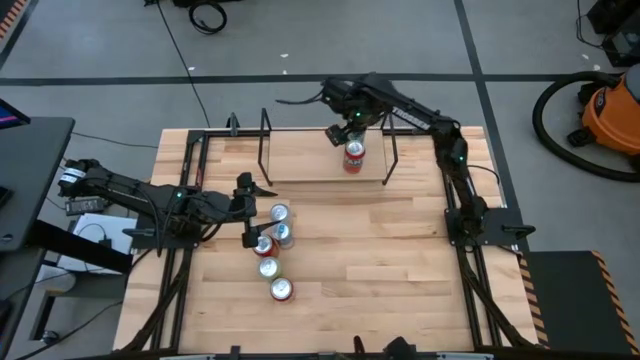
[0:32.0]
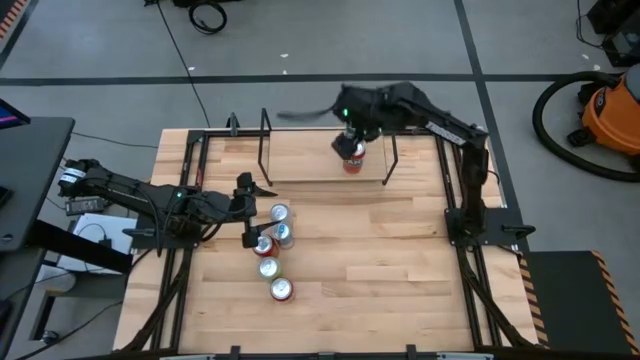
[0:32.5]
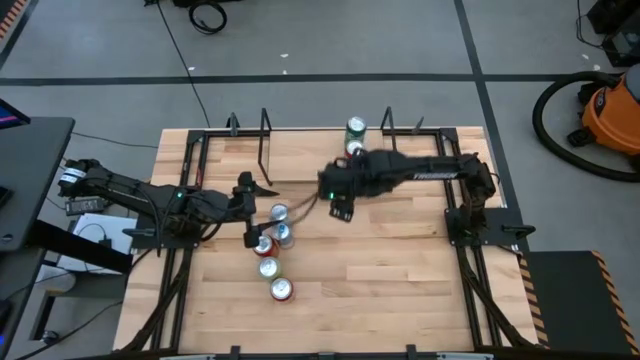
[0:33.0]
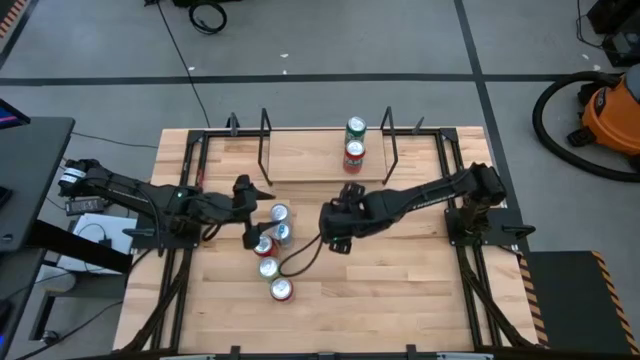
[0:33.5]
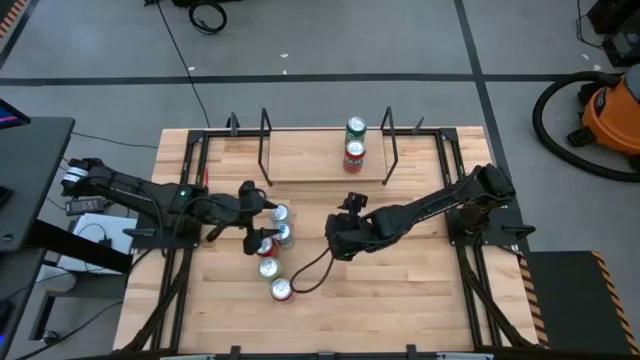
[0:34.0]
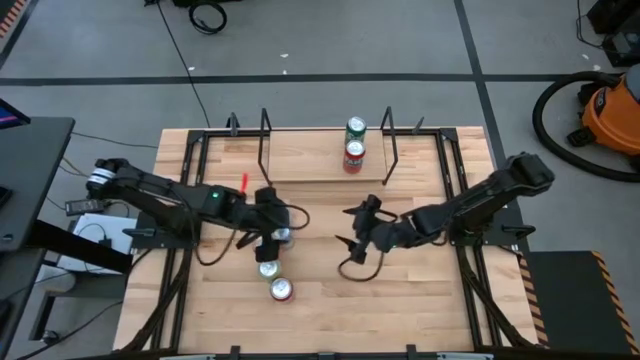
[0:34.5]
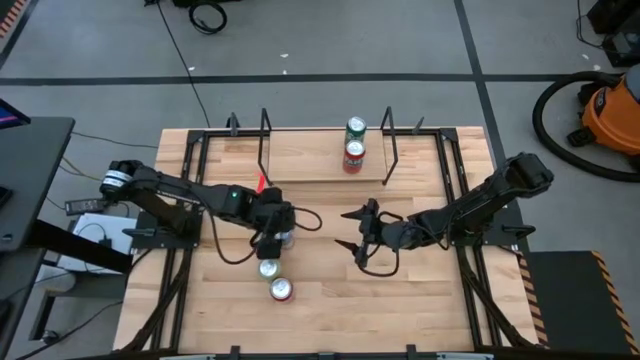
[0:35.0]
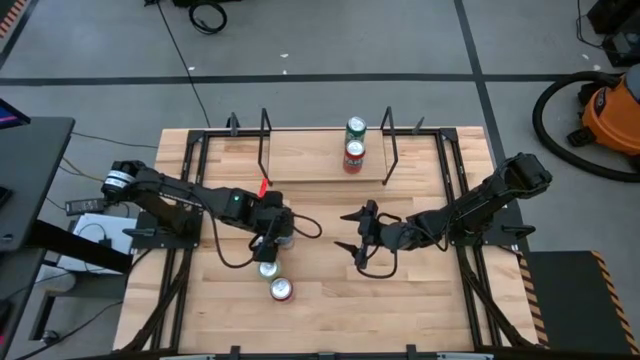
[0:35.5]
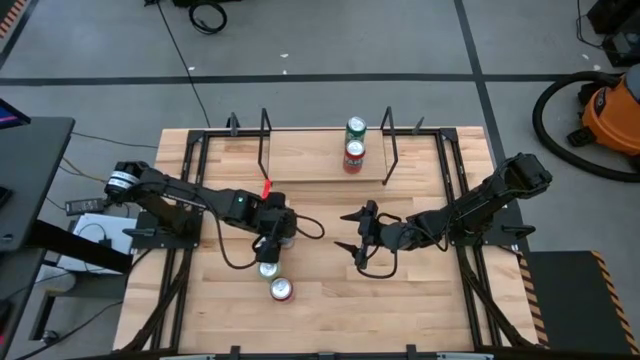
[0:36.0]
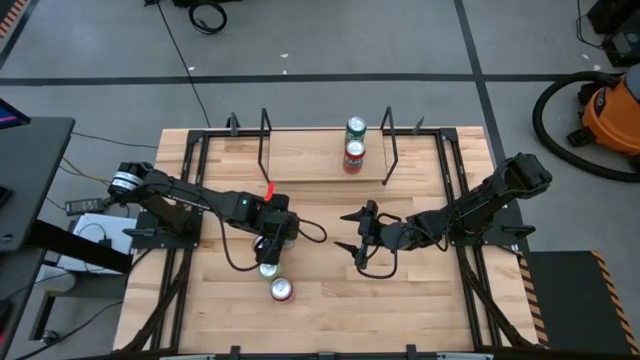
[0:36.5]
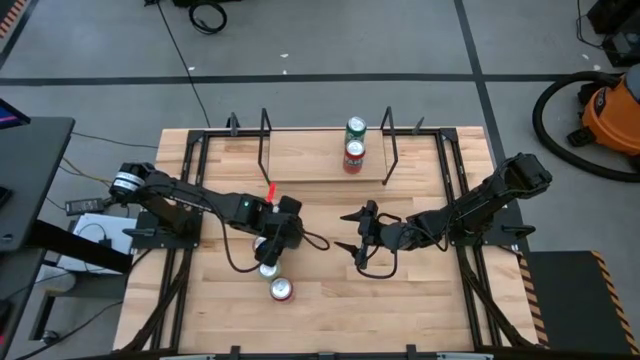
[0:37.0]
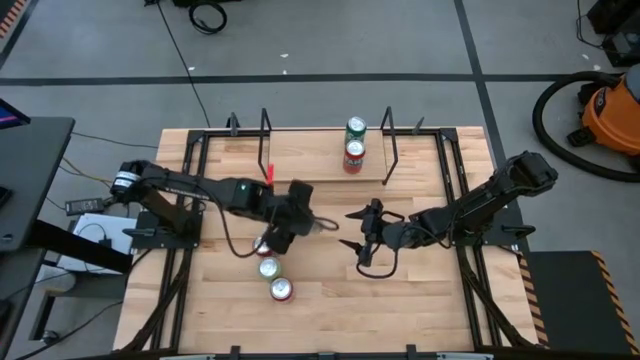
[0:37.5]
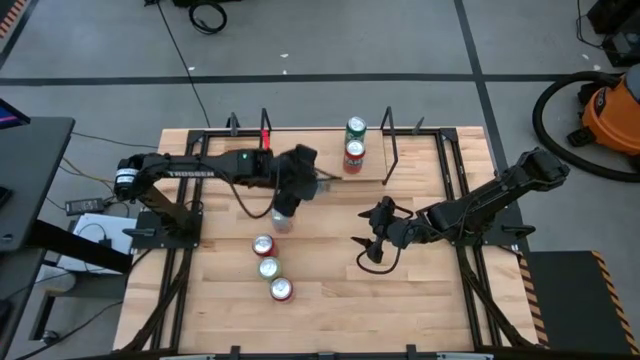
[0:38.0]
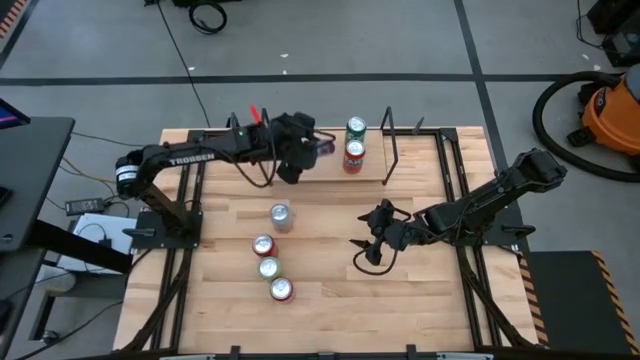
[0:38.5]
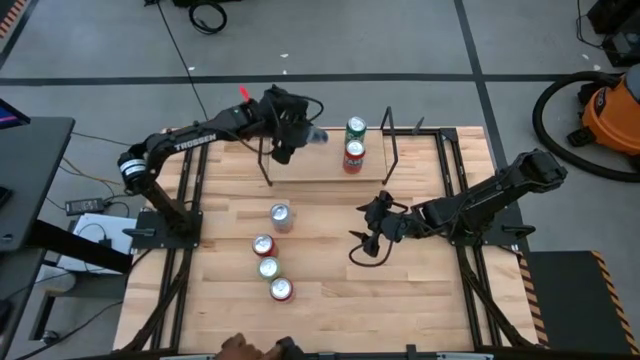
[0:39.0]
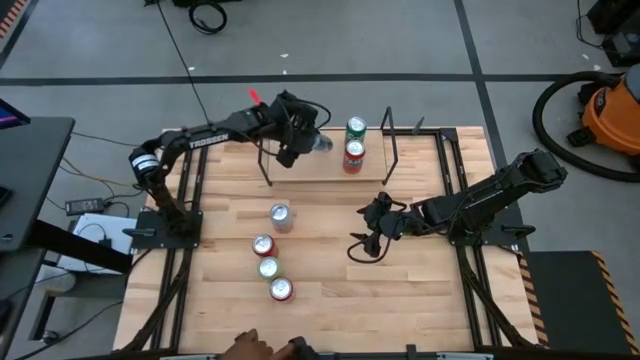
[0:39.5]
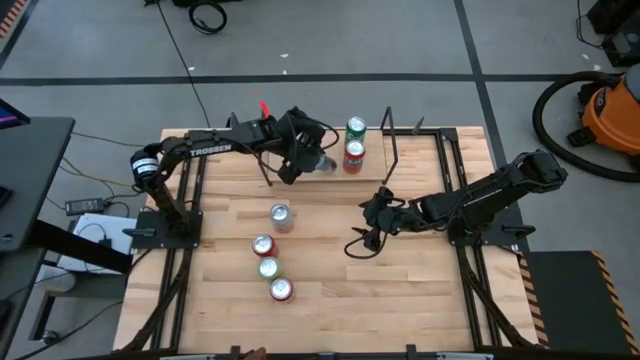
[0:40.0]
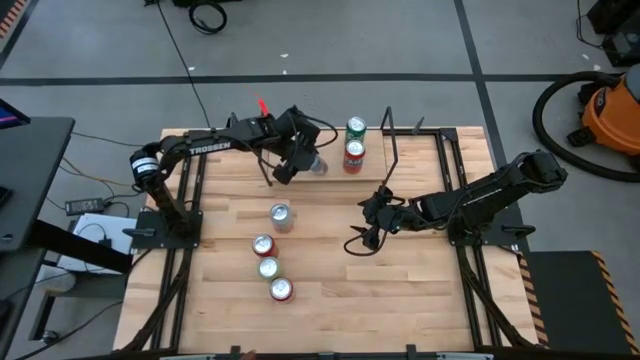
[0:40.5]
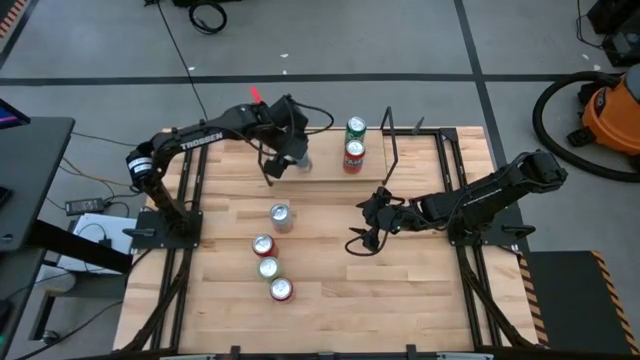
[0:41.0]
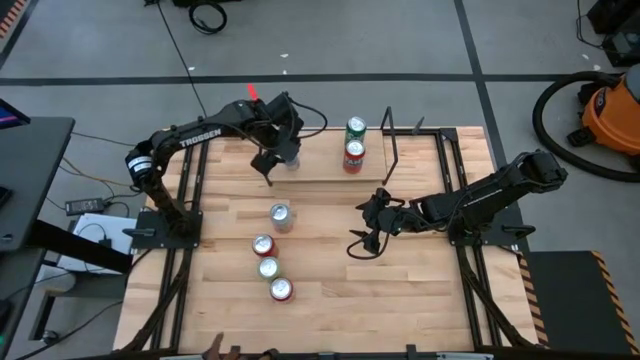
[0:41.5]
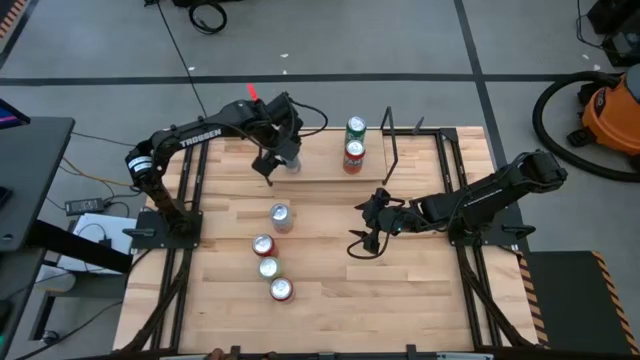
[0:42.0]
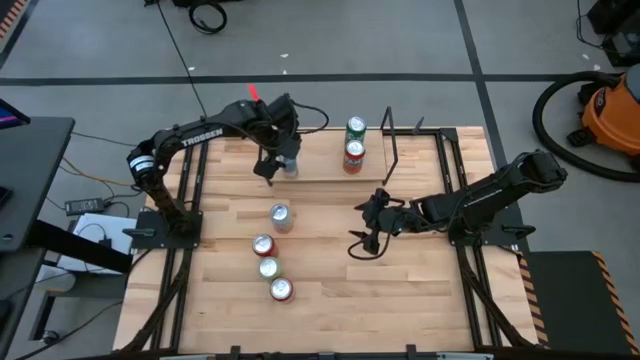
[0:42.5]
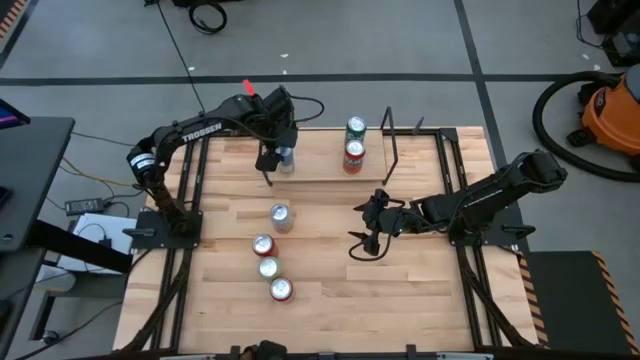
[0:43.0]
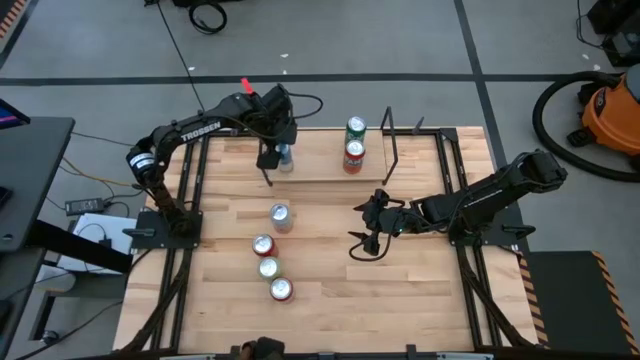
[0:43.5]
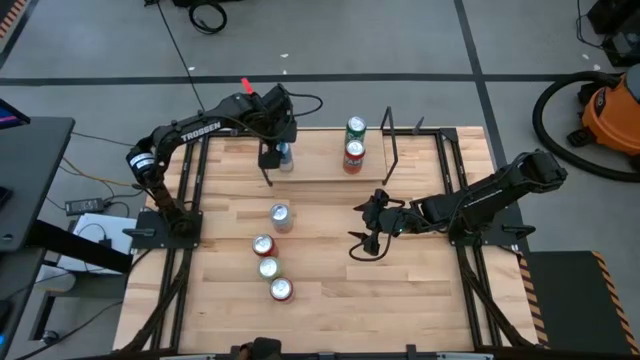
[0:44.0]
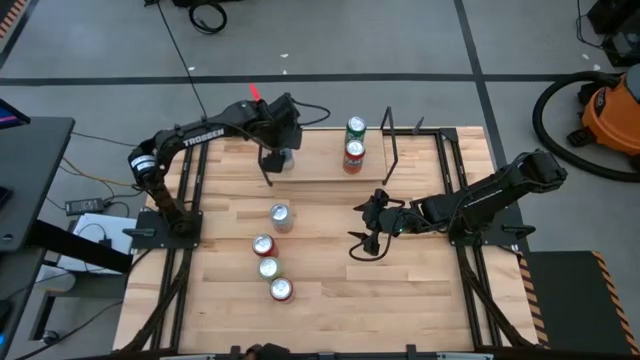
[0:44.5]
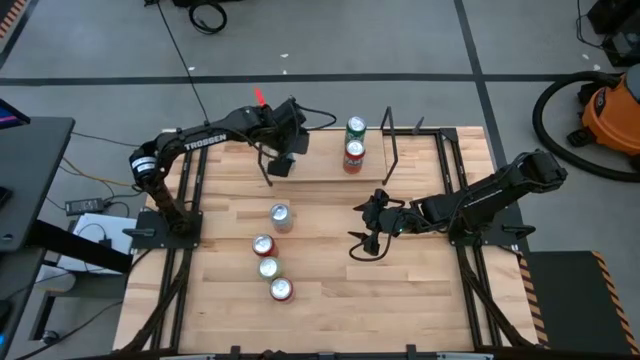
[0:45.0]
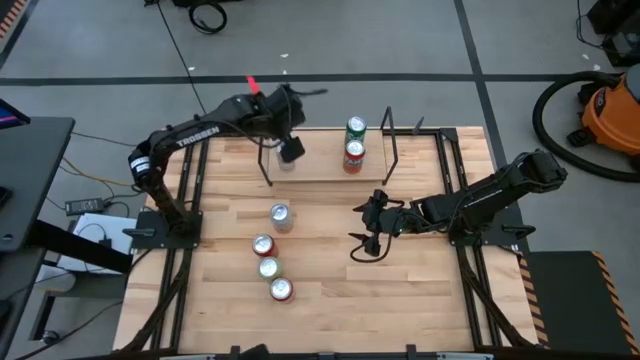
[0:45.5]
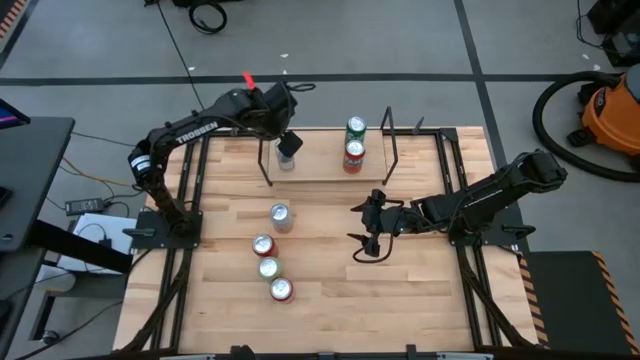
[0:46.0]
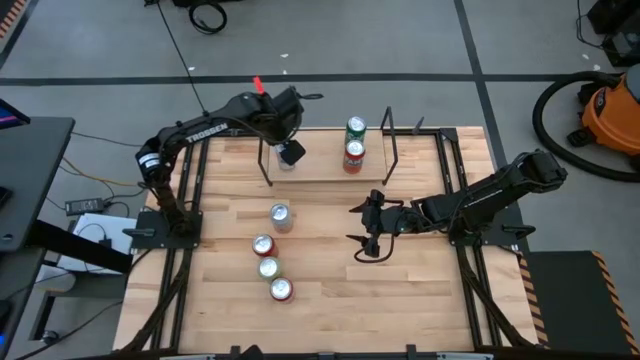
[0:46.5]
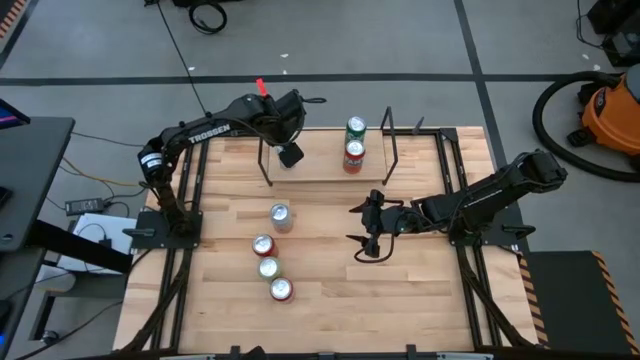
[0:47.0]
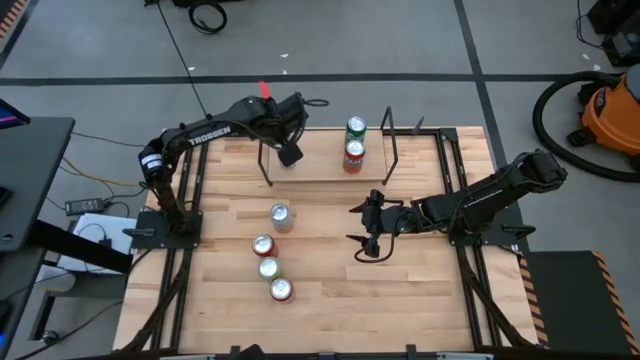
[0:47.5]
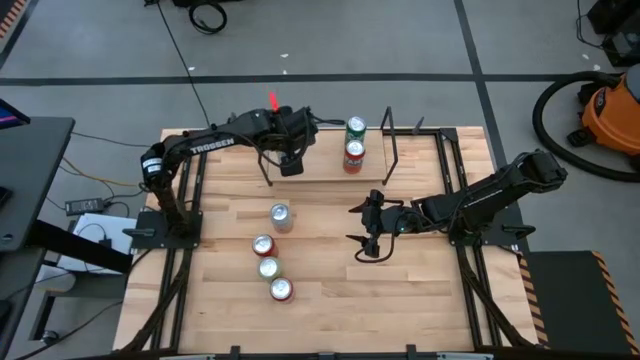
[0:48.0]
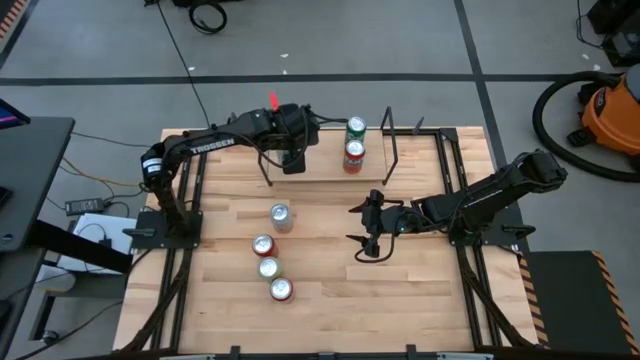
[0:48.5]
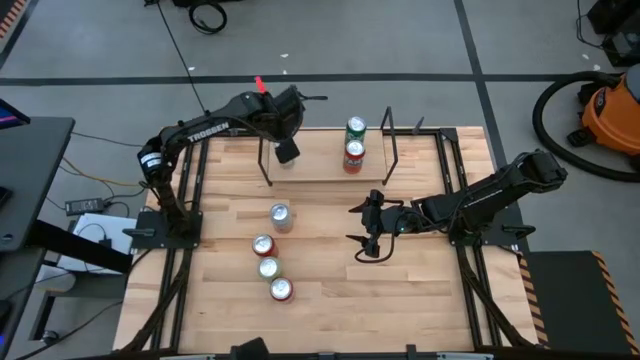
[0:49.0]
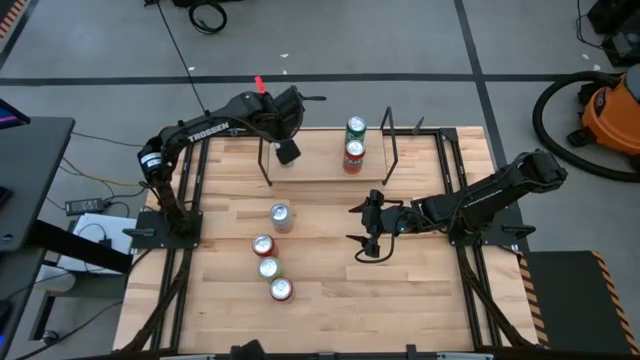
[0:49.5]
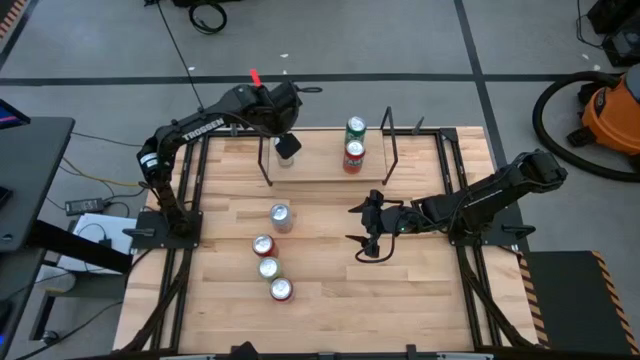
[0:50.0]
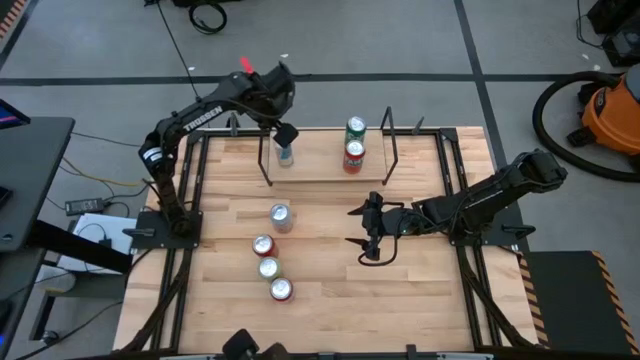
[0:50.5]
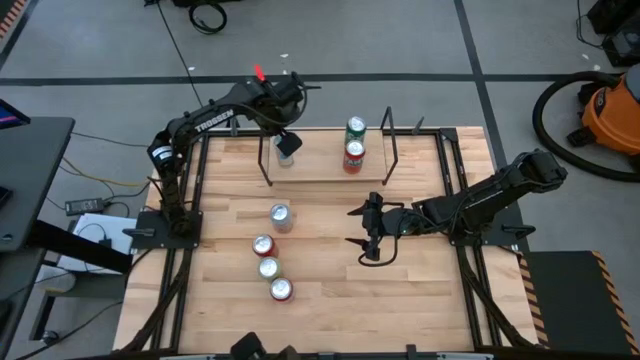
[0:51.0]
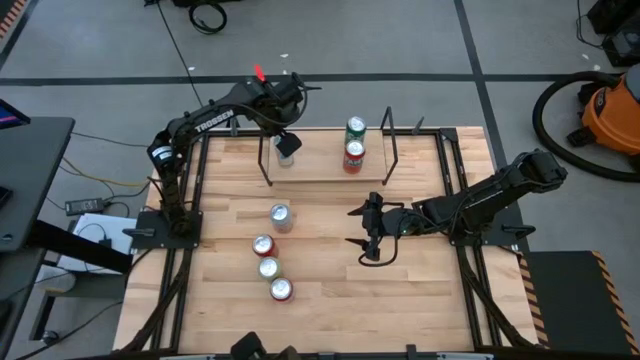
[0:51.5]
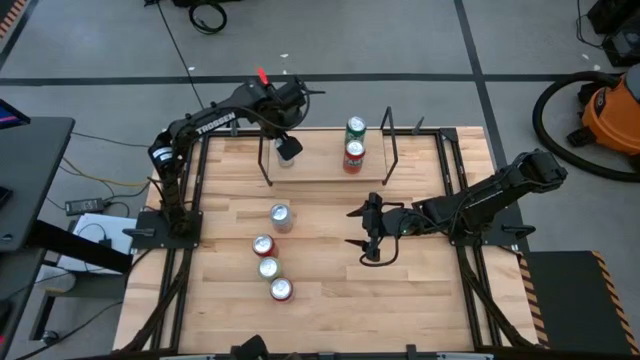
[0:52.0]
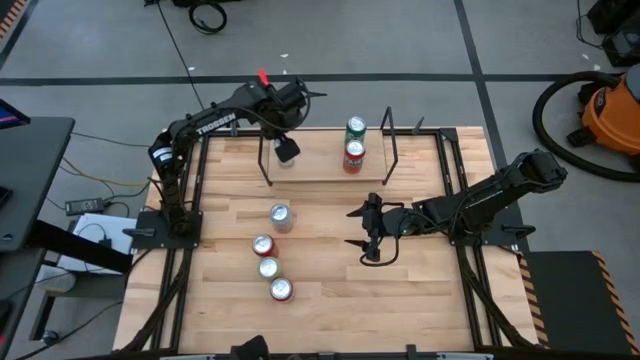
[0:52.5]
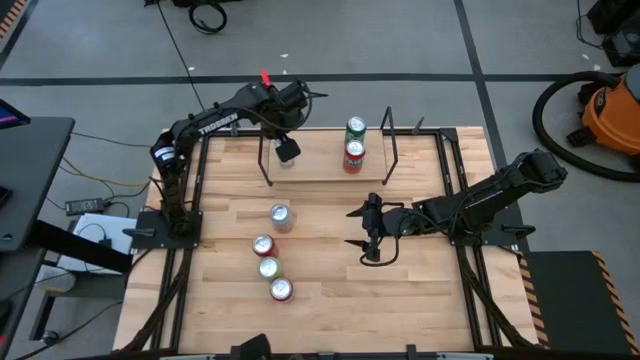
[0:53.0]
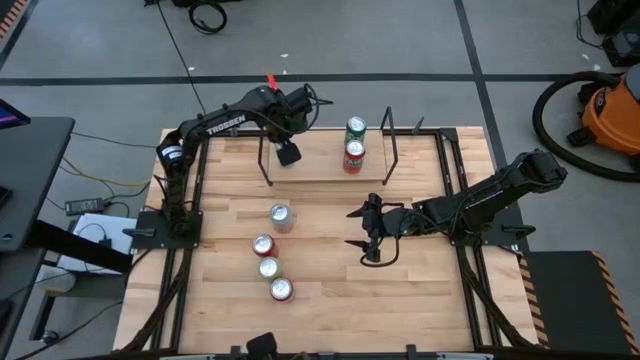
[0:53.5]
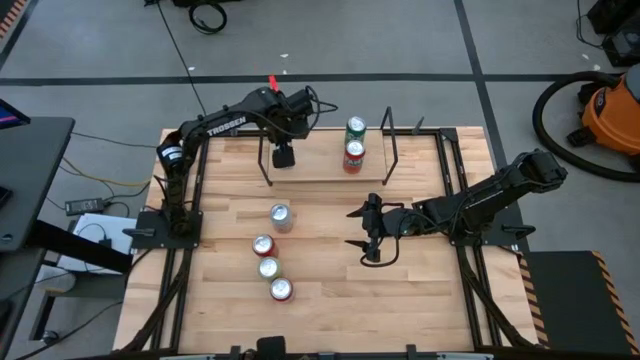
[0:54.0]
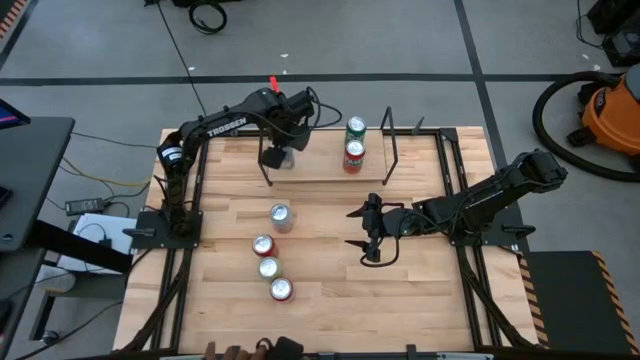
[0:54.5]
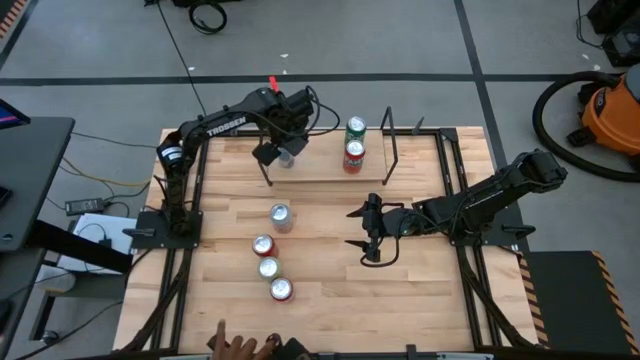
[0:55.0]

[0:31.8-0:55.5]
Task: Place canned beverage on shelf
Put the blue soda can on the shelf
